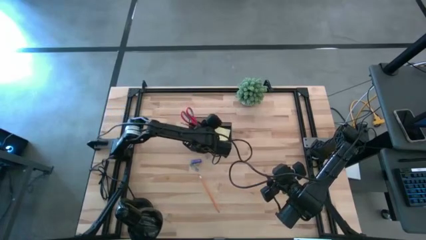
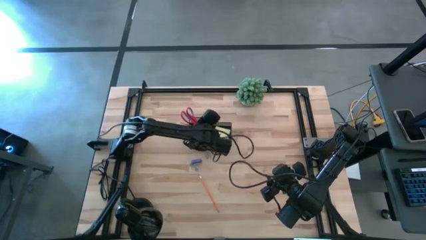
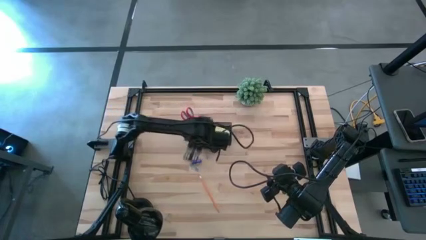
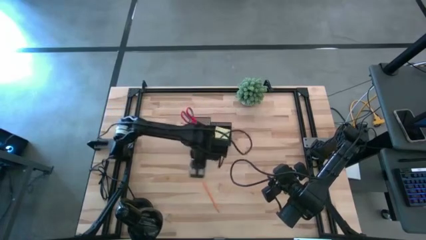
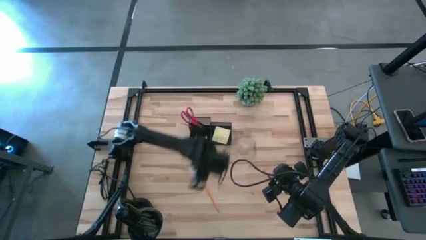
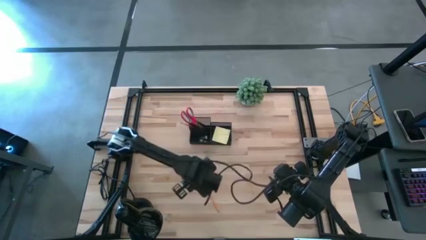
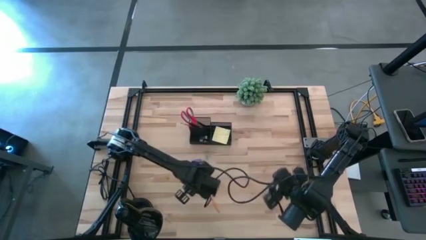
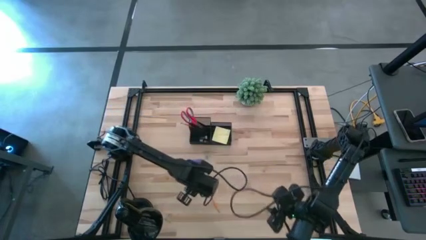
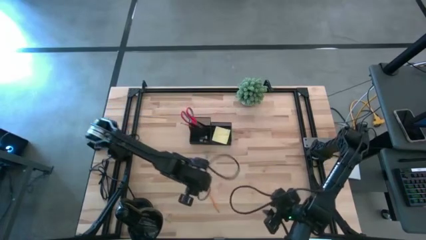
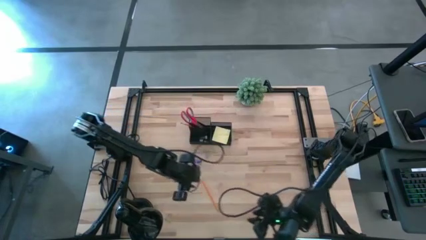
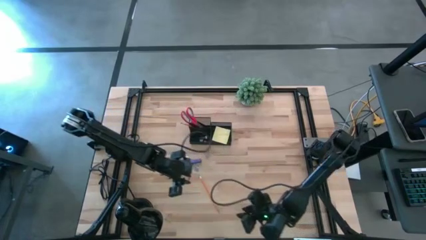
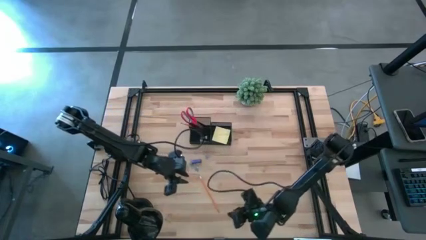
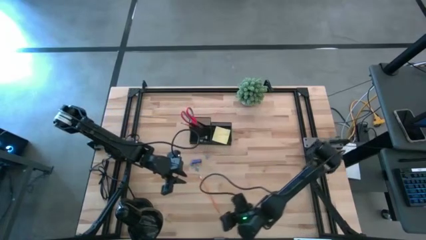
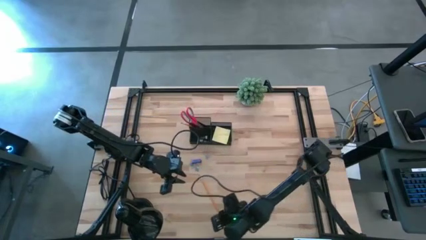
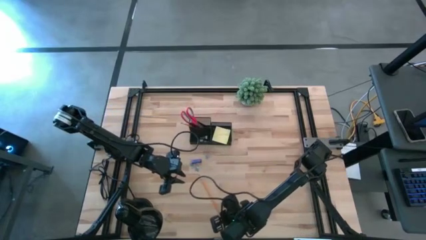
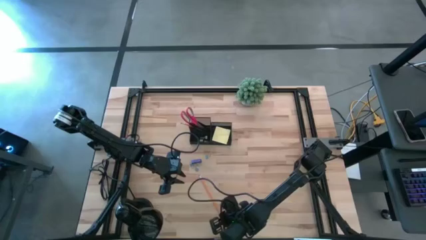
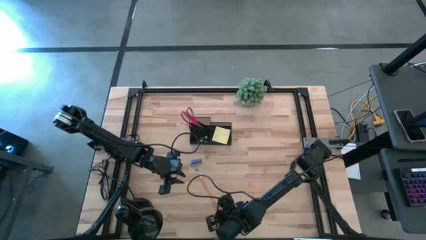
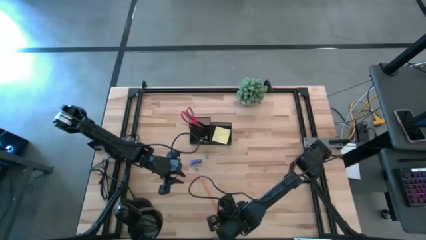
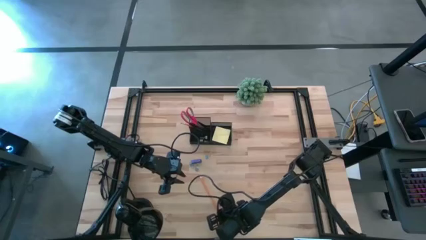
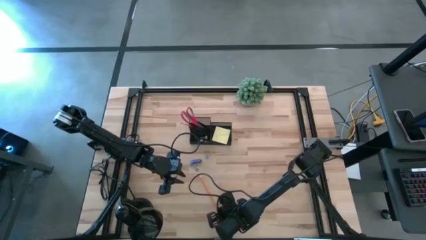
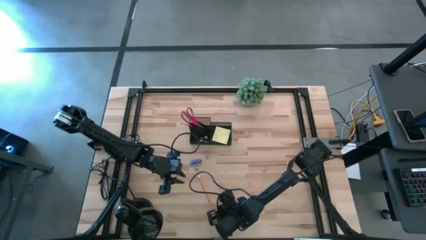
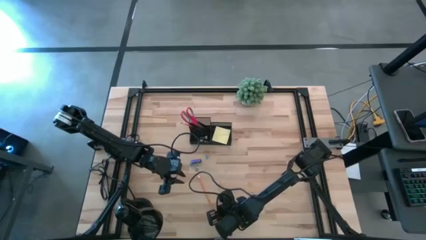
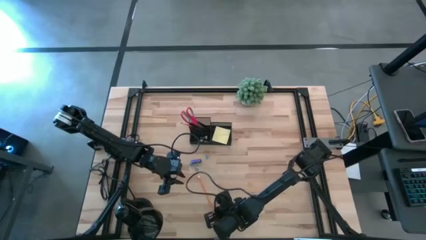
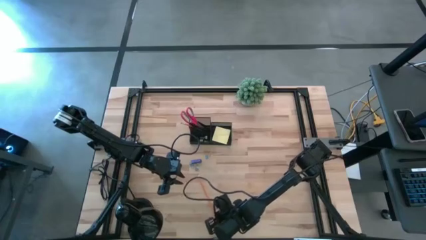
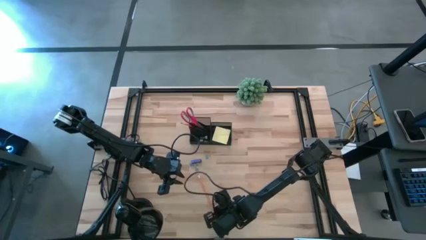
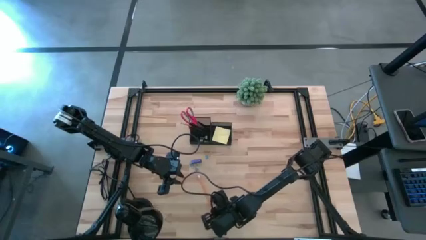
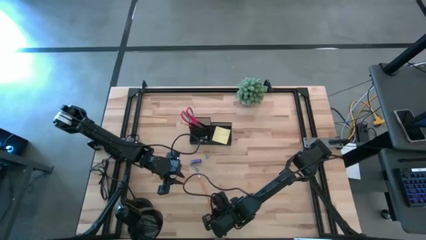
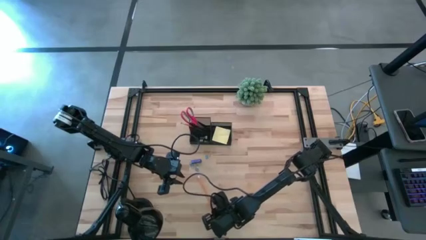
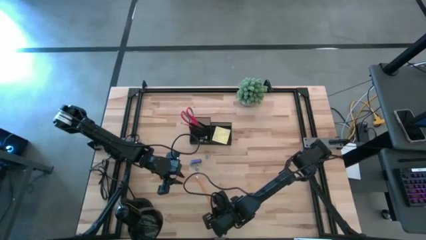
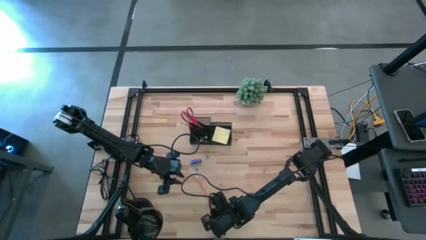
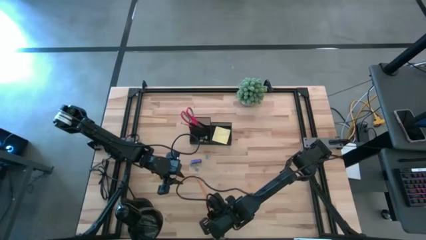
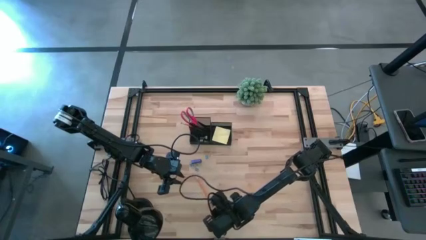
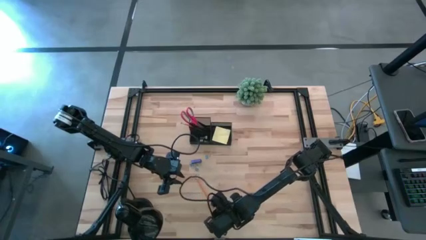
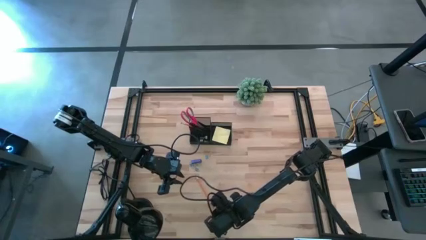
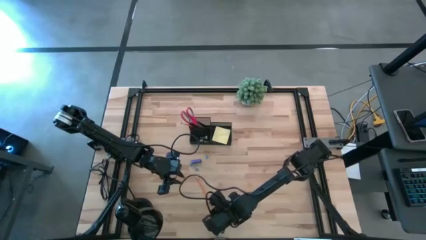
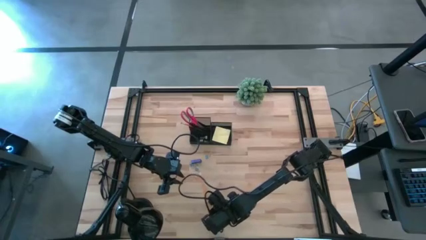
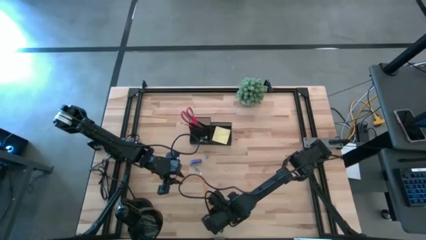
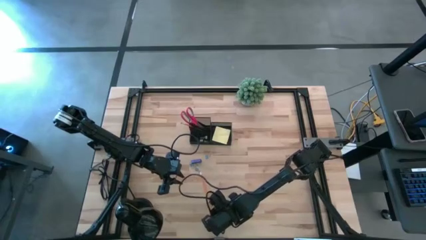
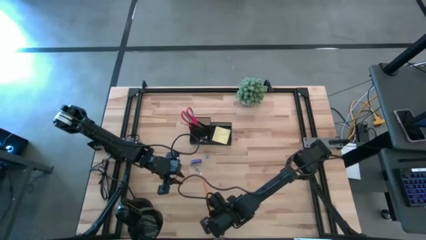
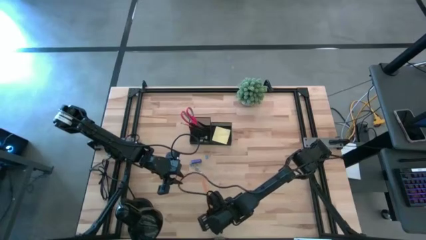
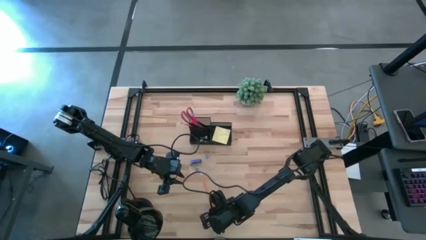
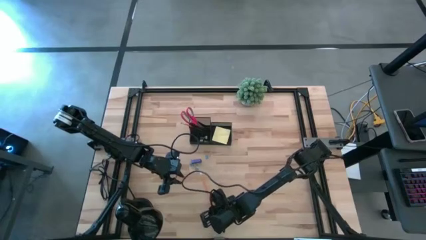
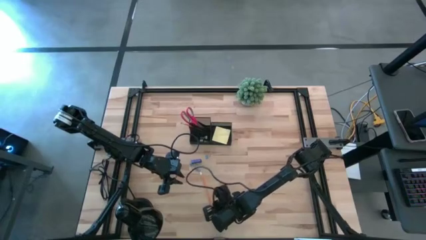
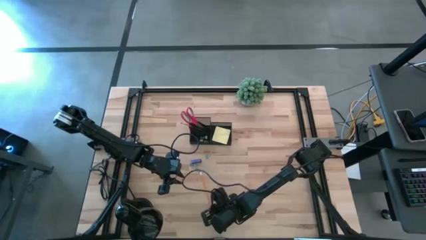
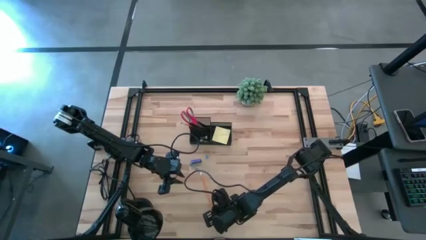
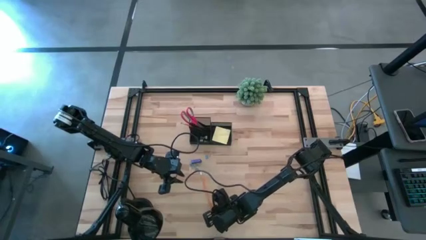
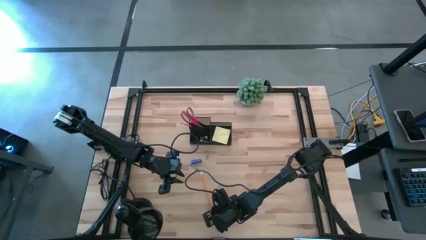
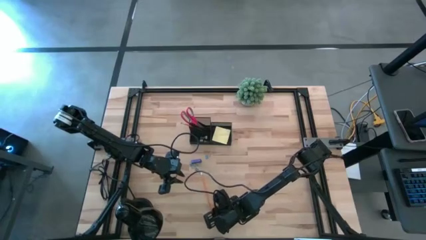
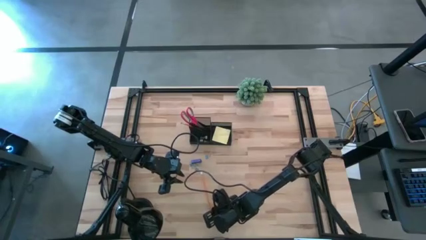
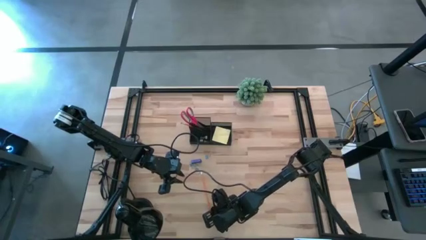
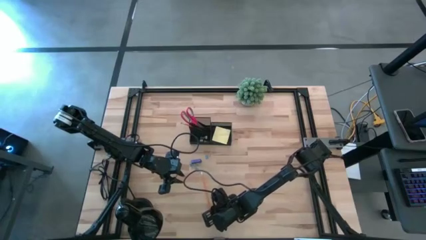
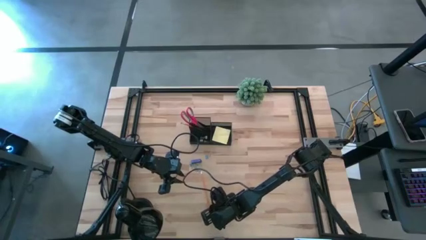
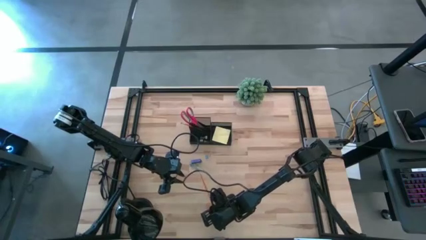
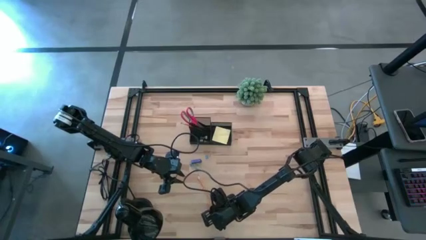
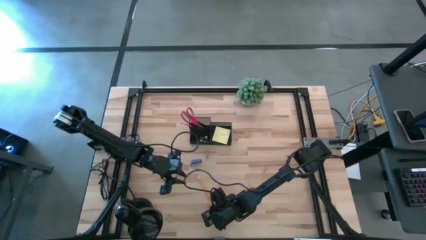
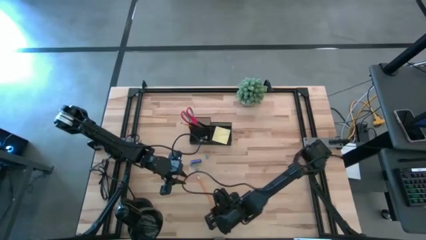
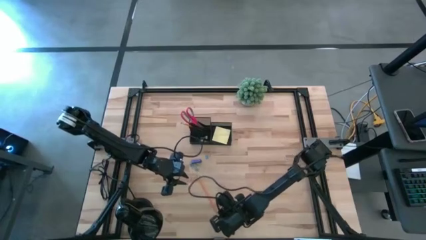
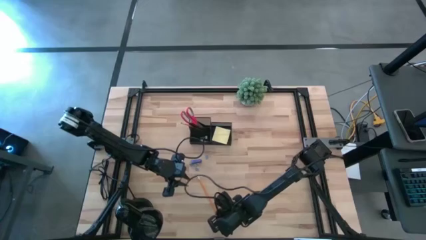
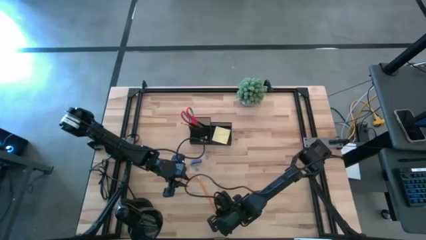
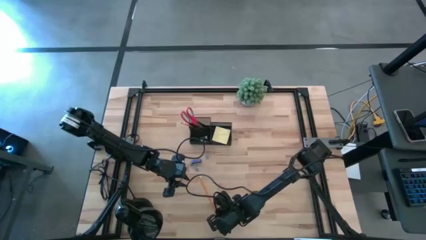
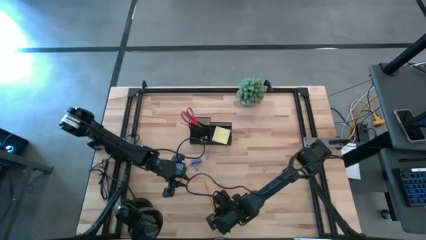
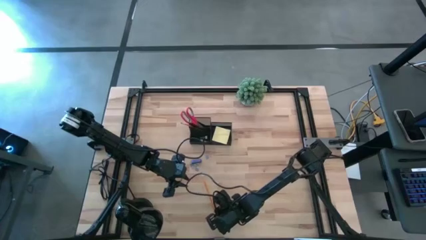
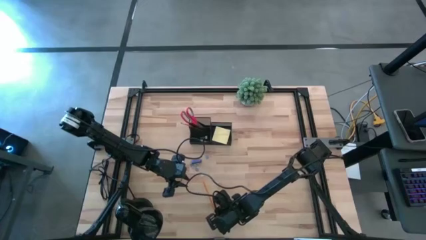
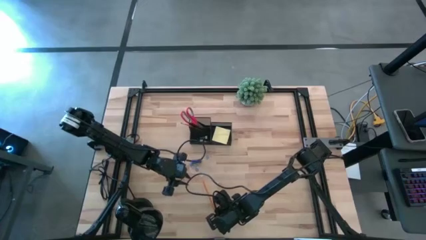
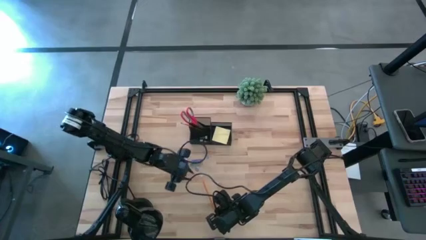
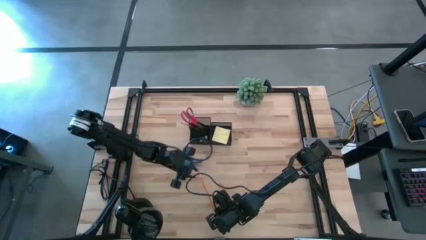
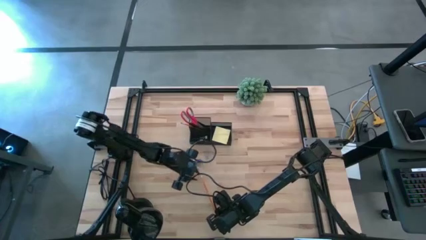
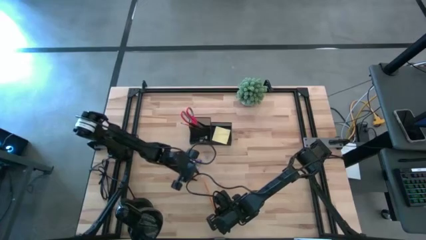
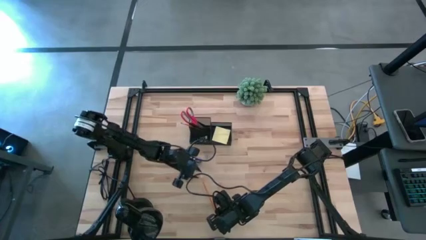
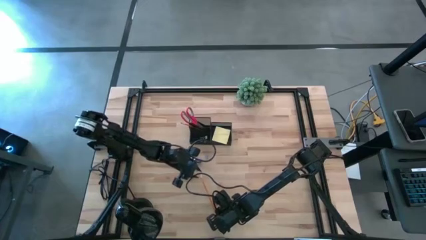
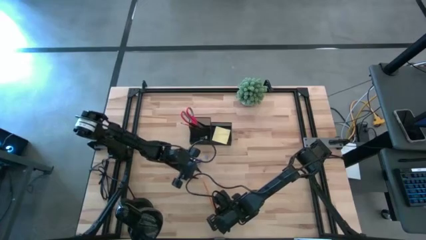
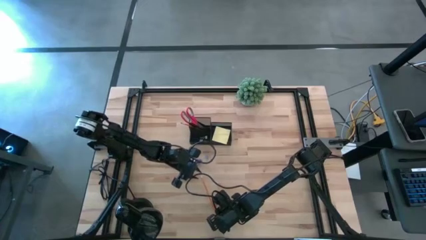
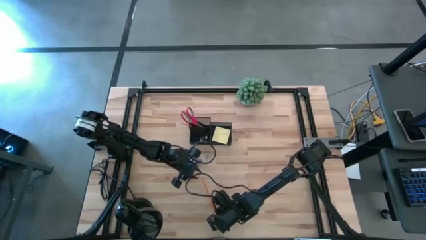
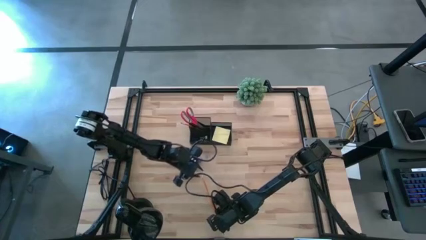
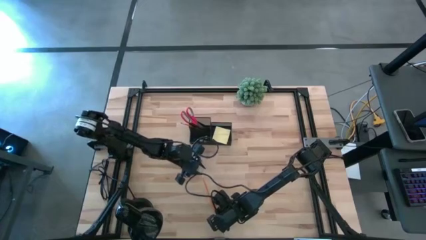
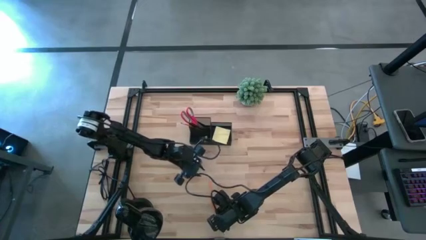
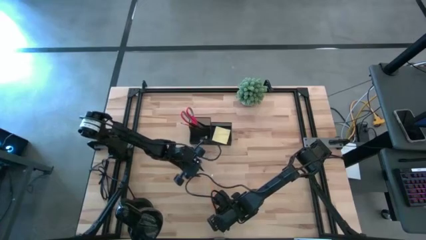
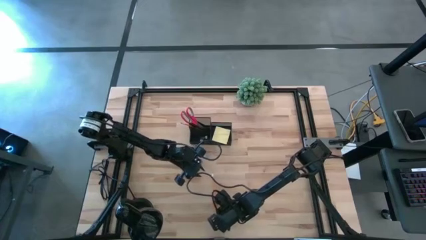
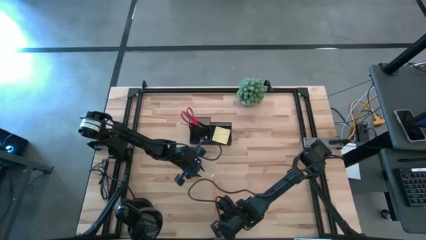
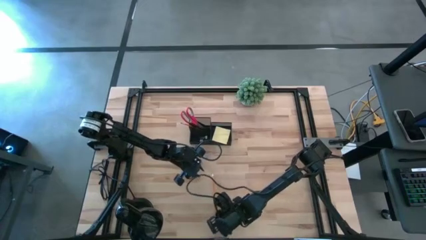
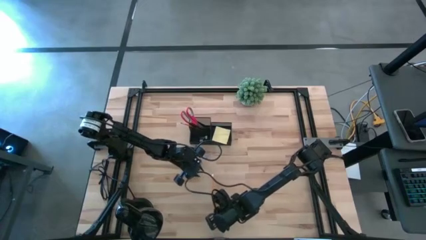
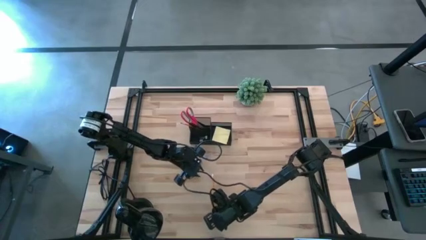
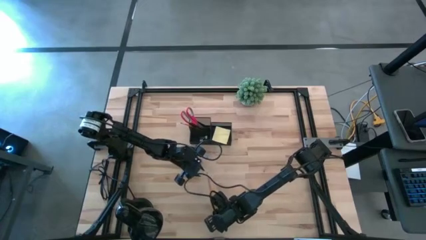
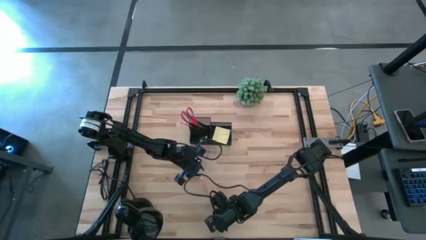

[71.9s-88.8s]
Task: Pick and place office supplies into organizer
Put the orange pencil into the desk organizer
